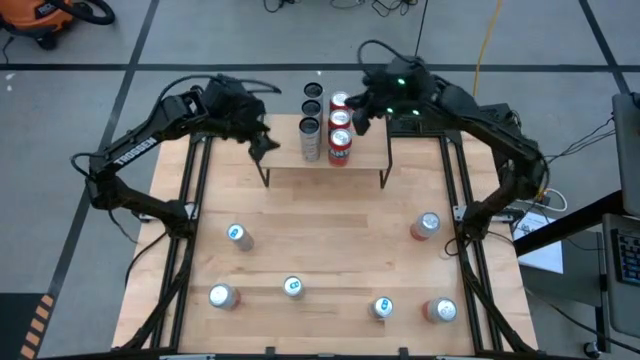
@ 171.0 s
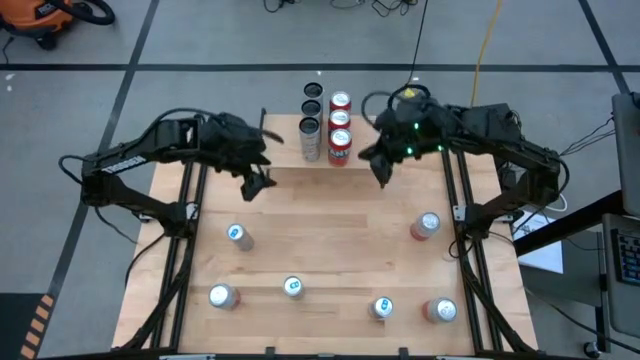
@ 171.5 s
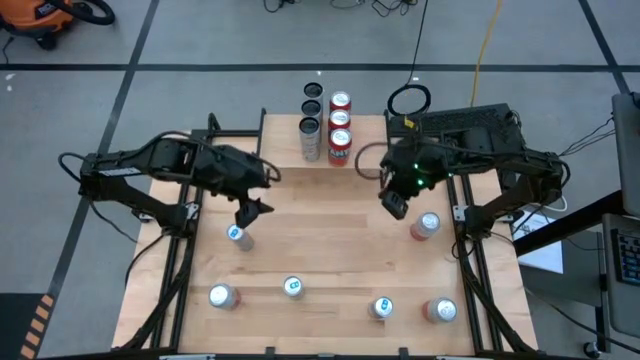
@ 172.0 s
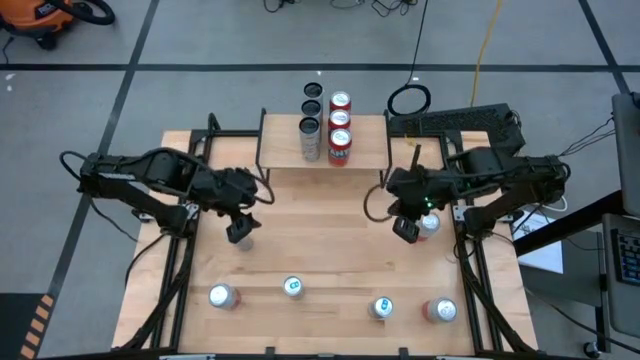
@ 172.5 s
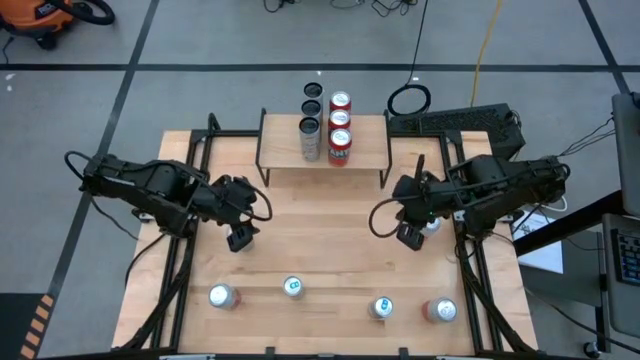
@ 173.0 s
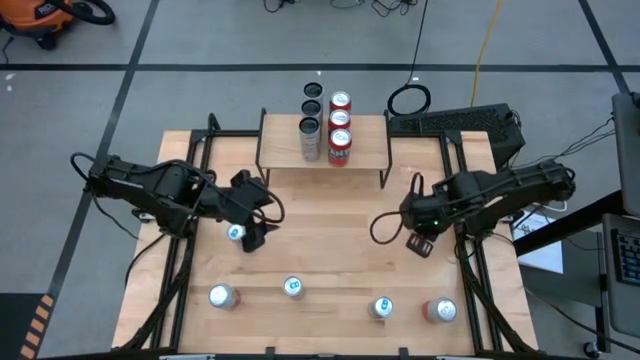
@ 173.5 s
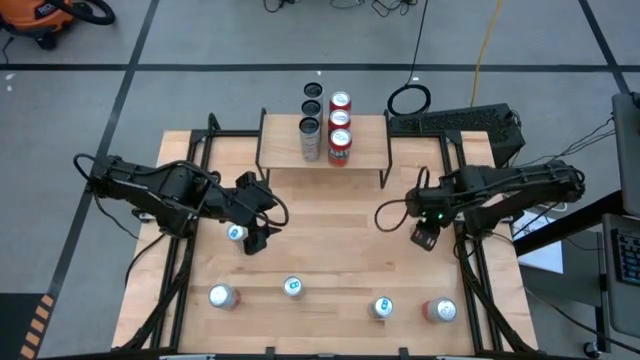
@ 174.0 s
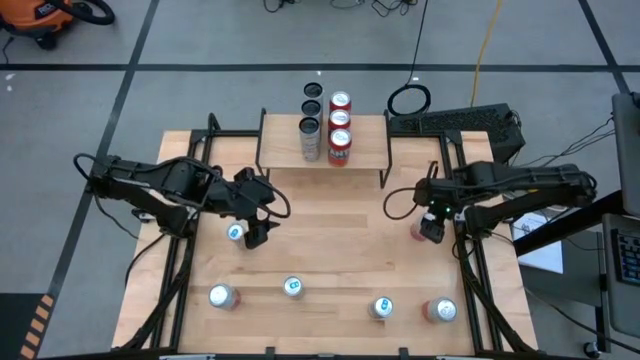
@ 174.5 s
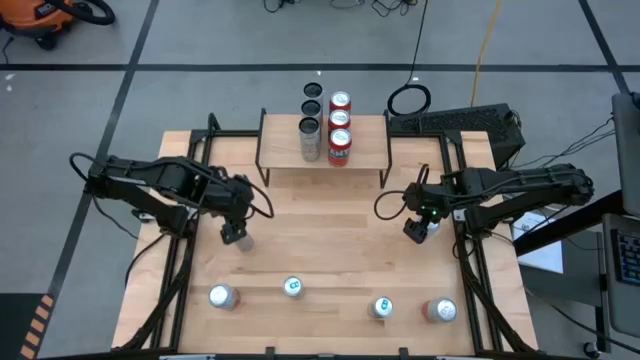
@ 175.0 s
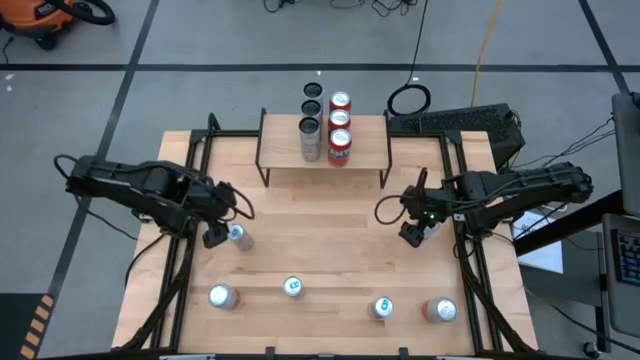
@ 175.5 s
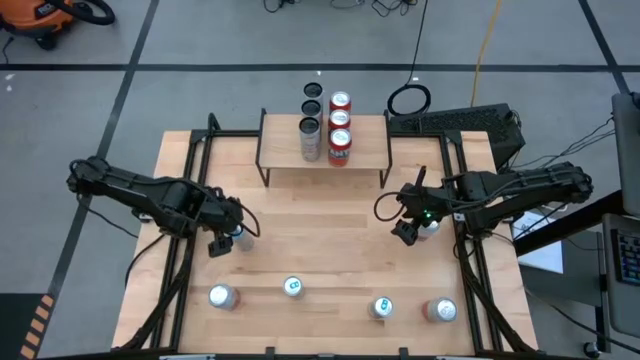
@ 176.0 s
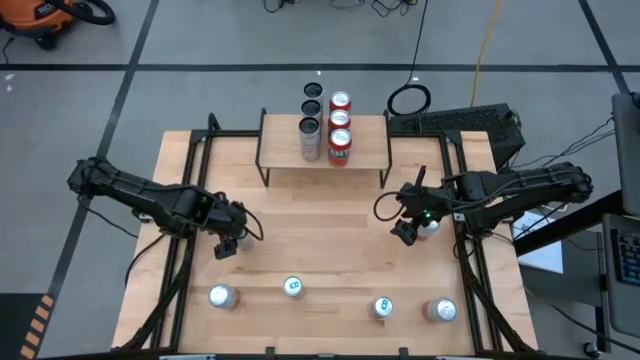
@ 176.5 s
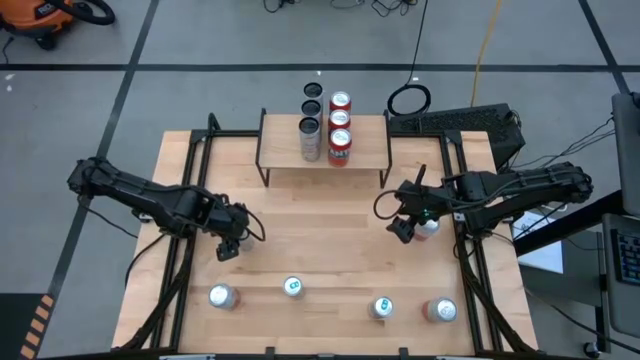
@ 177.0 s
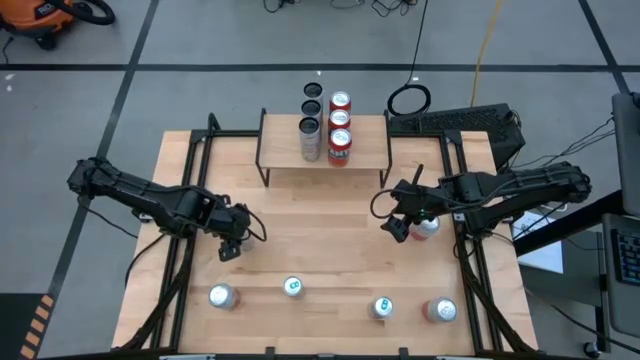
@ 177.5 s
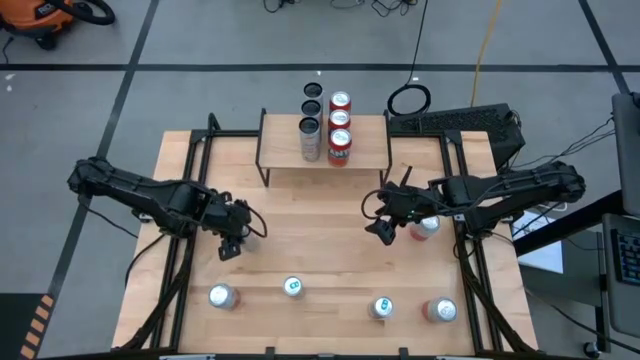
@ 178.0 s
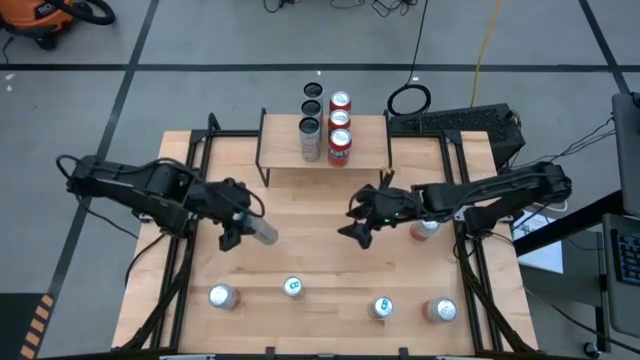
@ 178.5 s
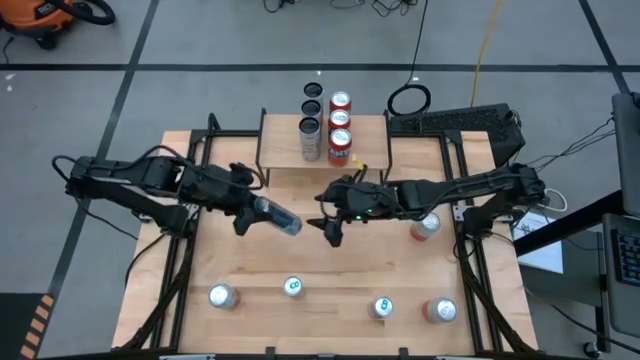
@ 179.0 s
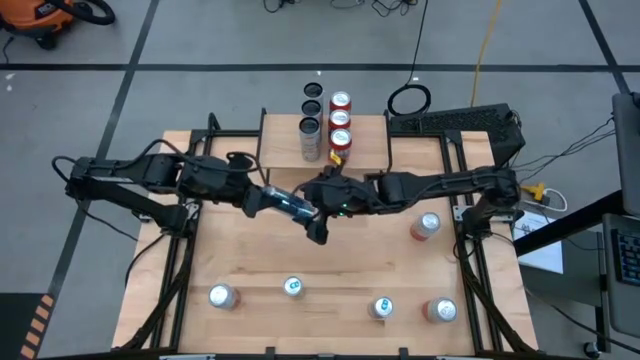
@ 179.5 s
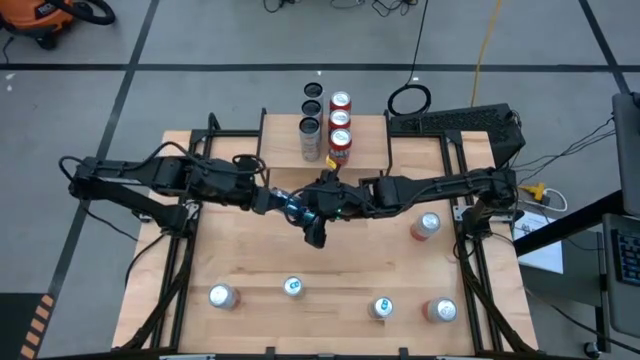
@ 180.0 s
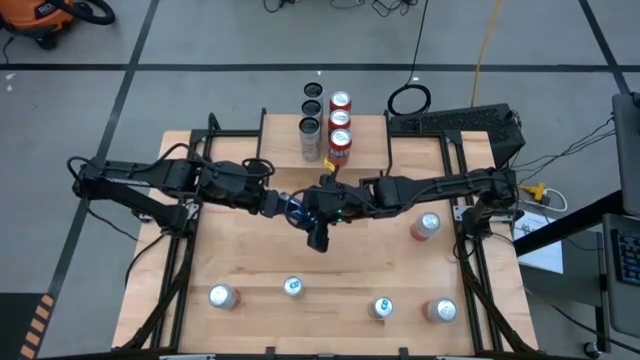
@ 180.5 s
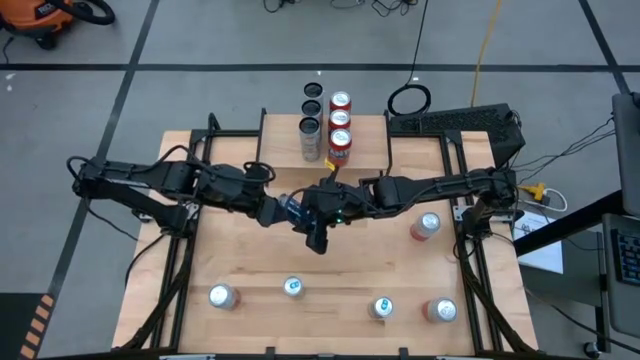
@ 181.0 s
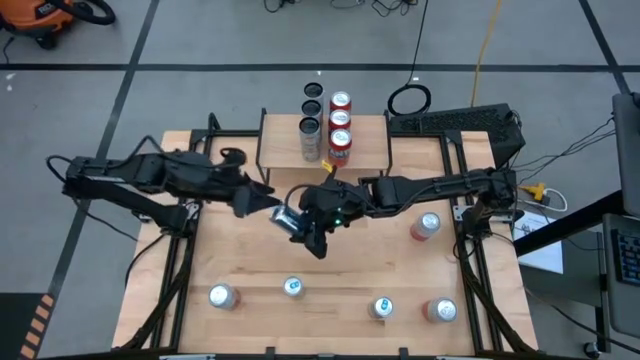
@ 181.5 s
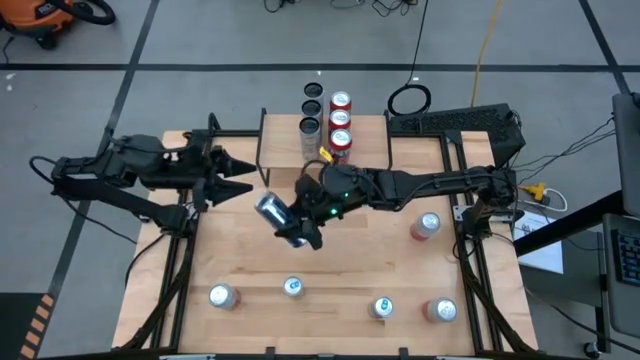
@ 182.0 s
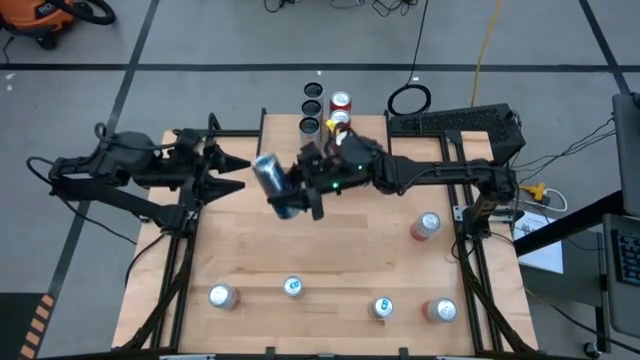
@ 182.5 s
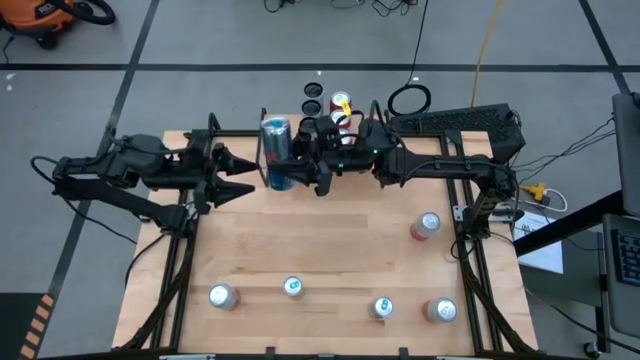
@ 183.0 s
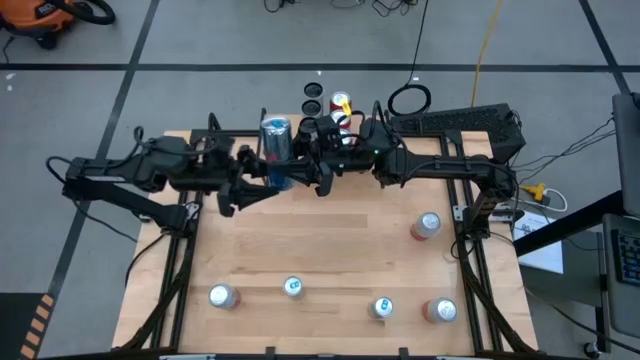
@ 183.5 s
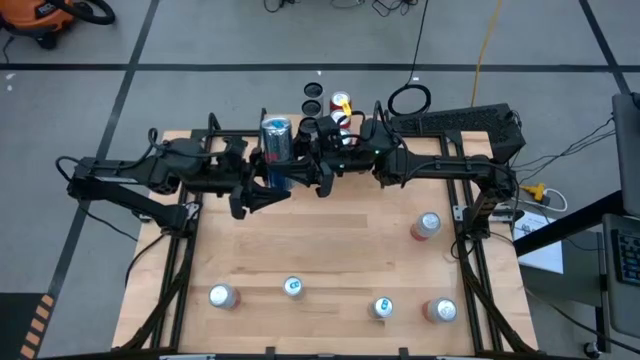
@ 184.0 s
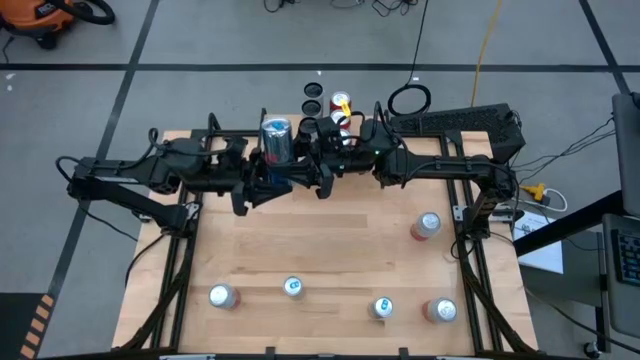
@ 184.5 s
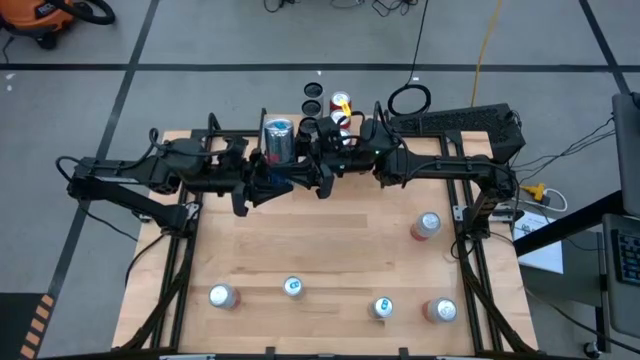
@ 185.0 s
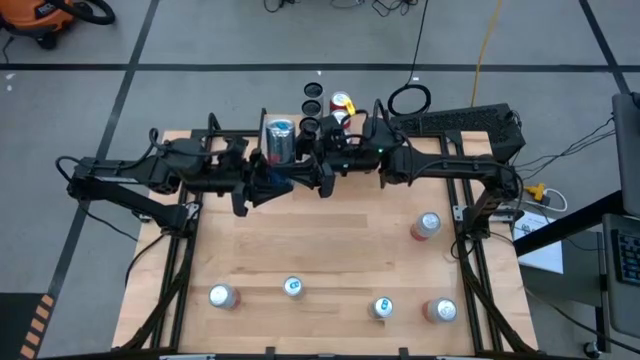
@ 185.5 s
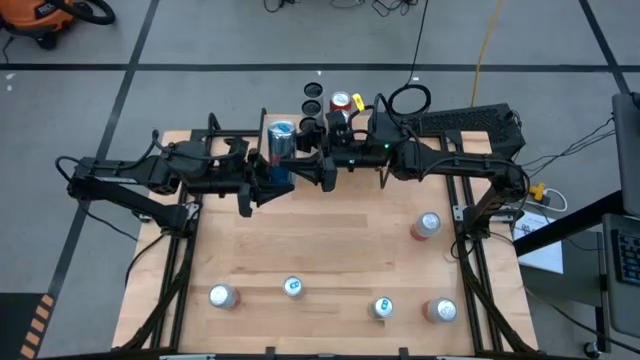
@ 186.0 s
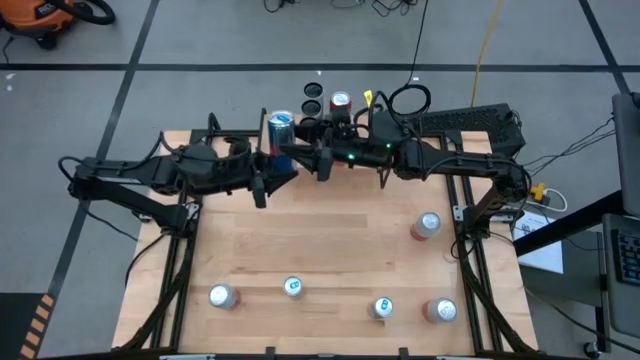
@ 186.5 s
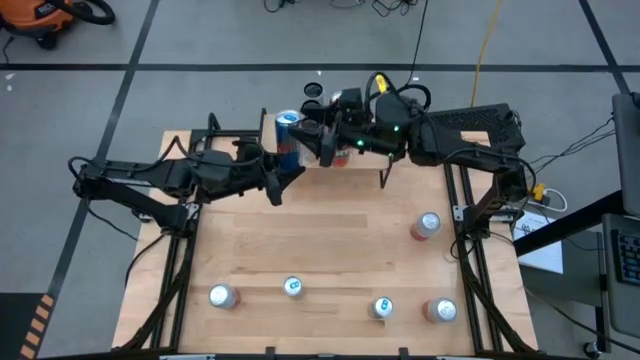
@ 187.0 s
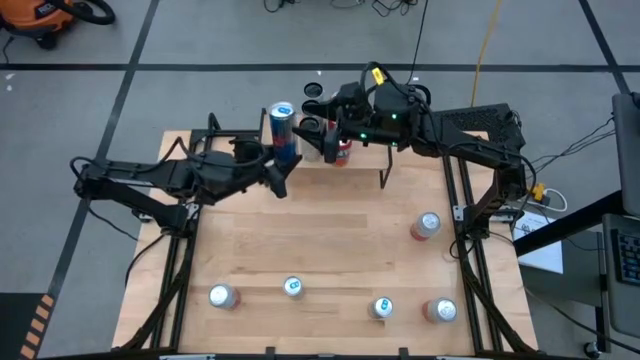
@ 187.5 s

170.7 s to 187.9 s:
Task: Place canned beverage on shelf
Put the left blue soda can on the shelf
